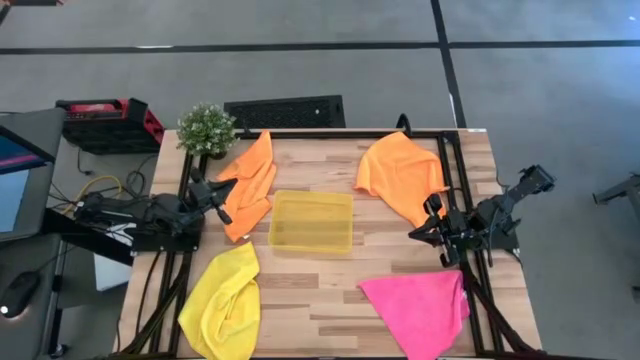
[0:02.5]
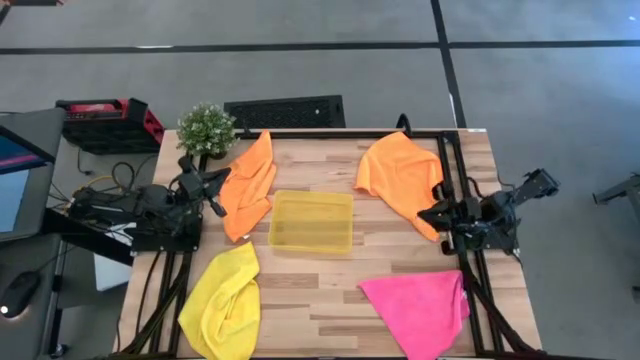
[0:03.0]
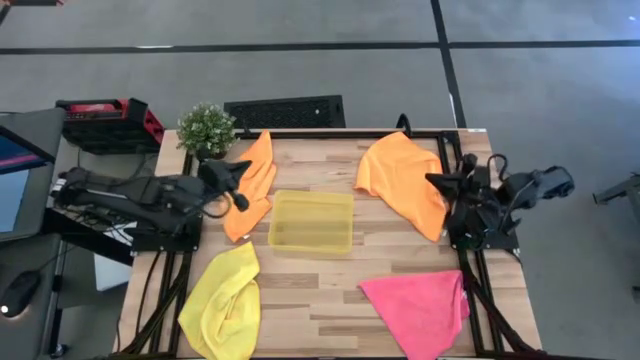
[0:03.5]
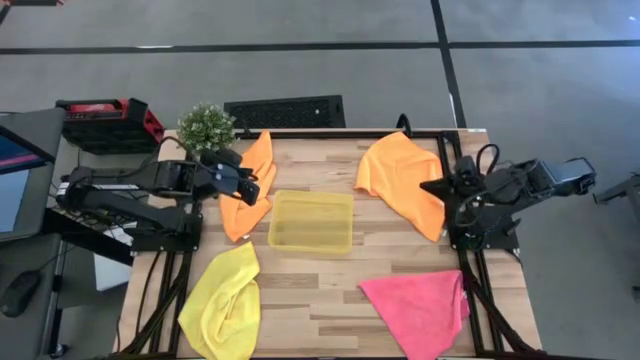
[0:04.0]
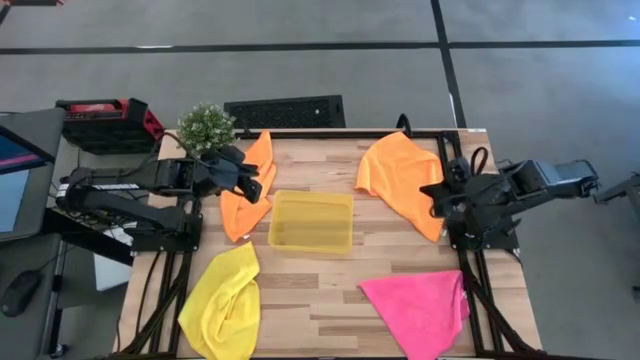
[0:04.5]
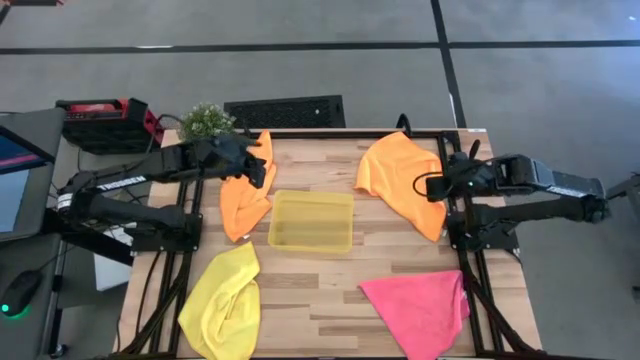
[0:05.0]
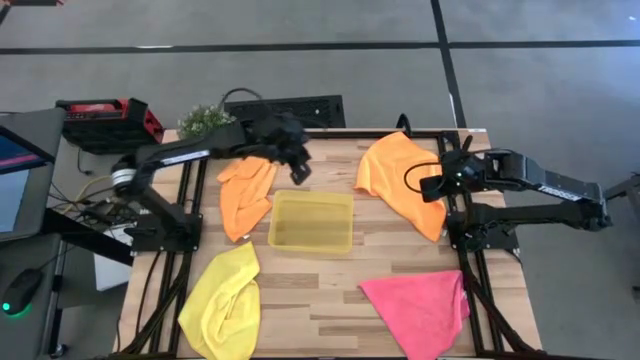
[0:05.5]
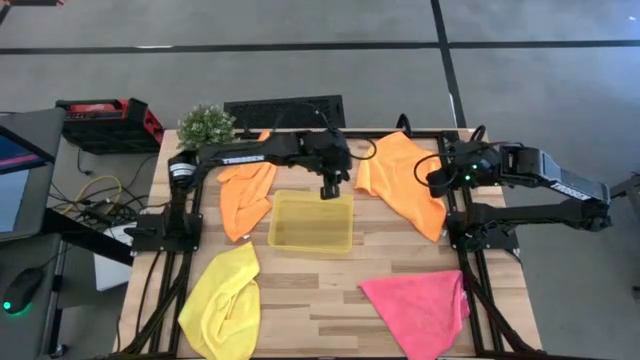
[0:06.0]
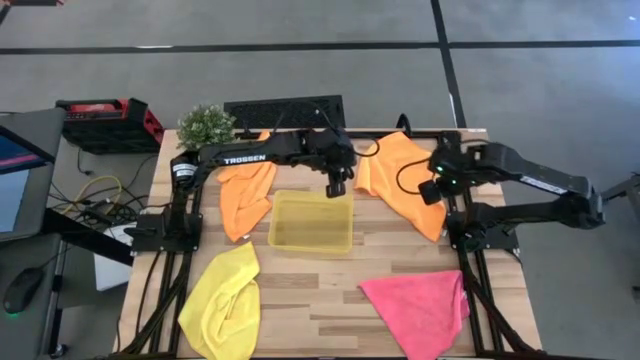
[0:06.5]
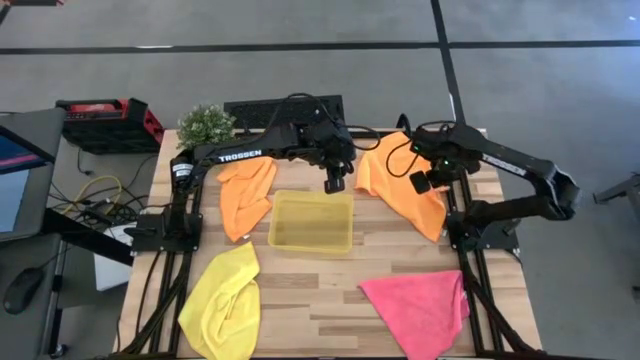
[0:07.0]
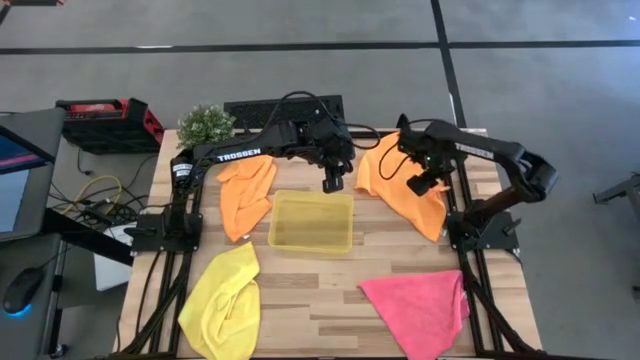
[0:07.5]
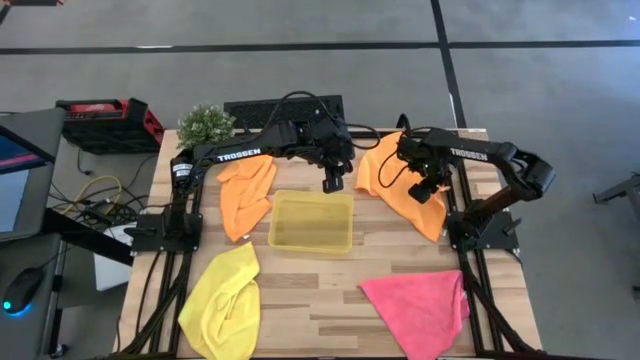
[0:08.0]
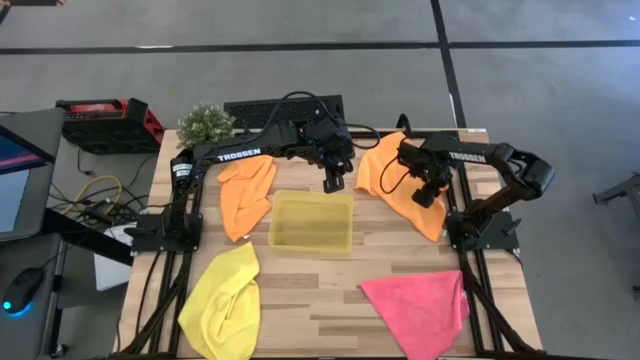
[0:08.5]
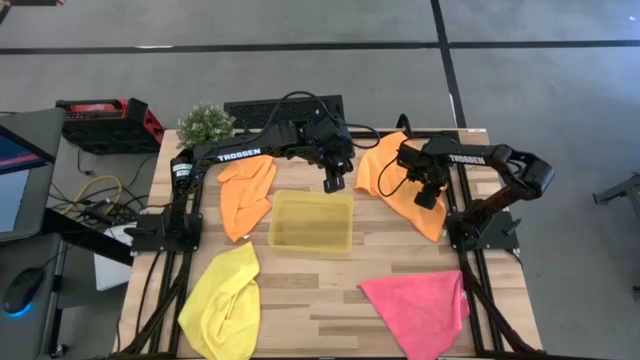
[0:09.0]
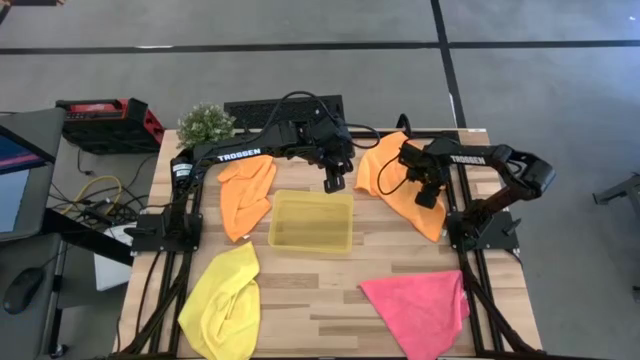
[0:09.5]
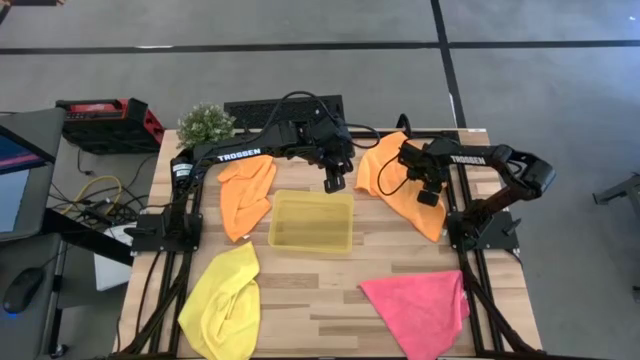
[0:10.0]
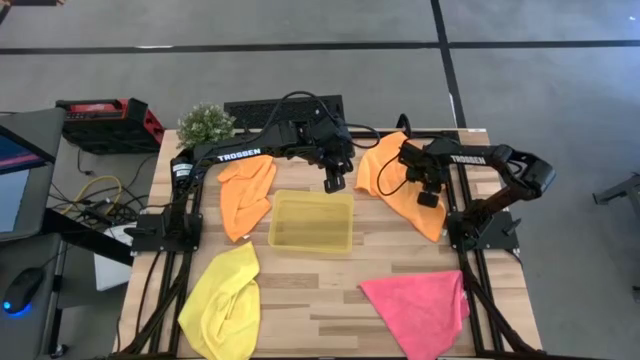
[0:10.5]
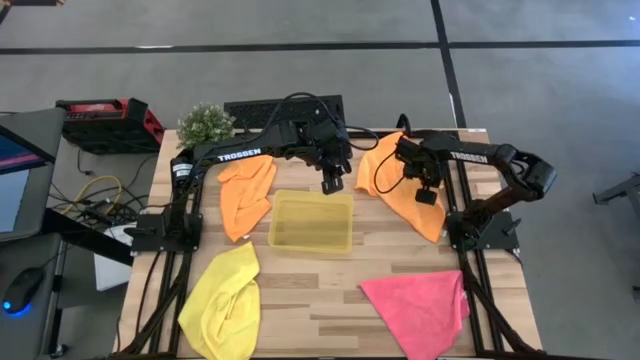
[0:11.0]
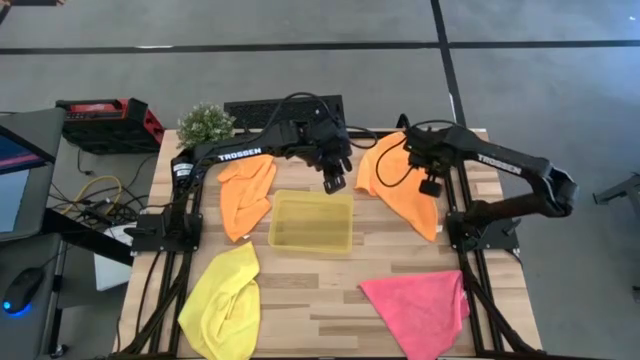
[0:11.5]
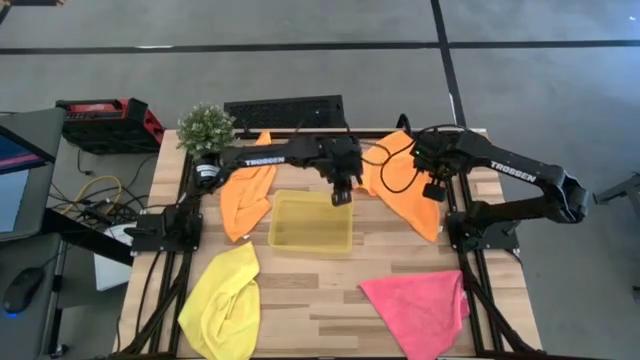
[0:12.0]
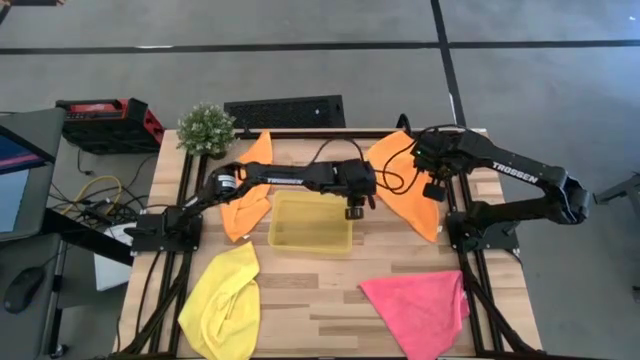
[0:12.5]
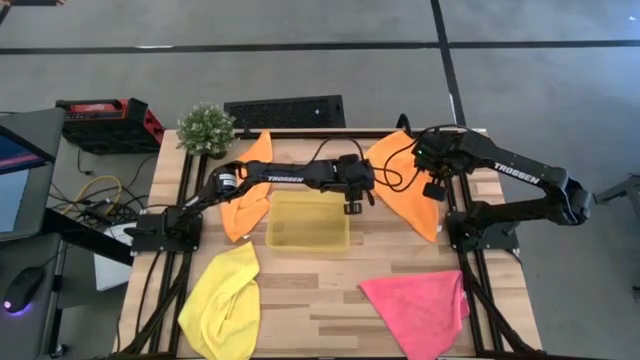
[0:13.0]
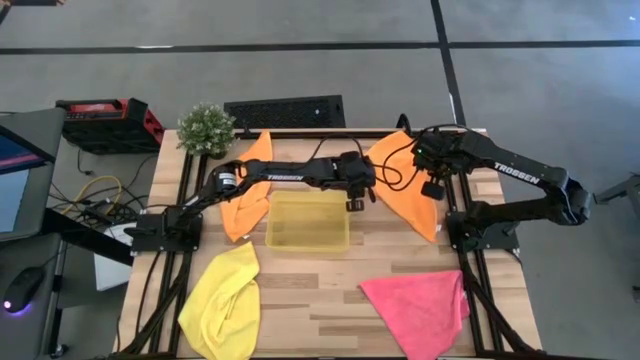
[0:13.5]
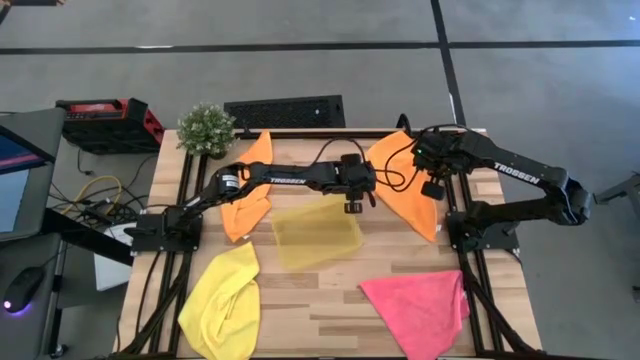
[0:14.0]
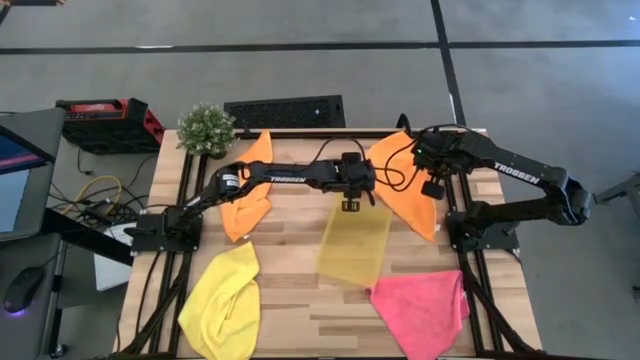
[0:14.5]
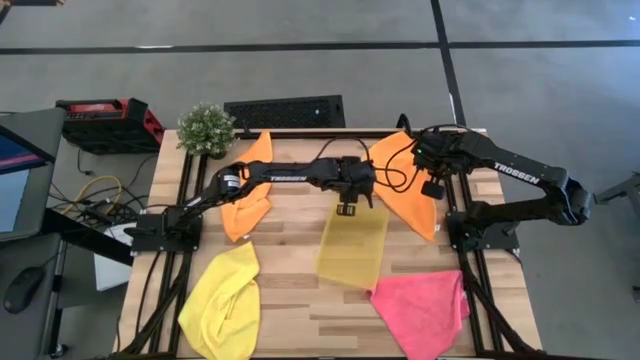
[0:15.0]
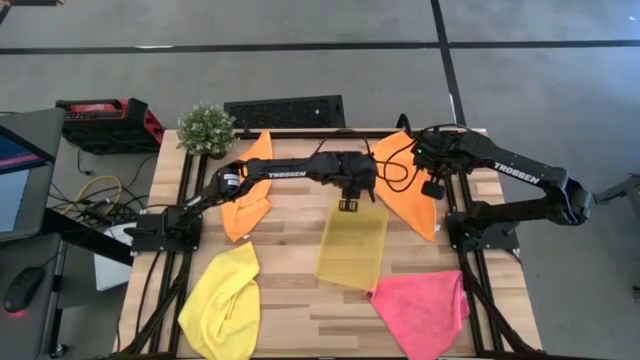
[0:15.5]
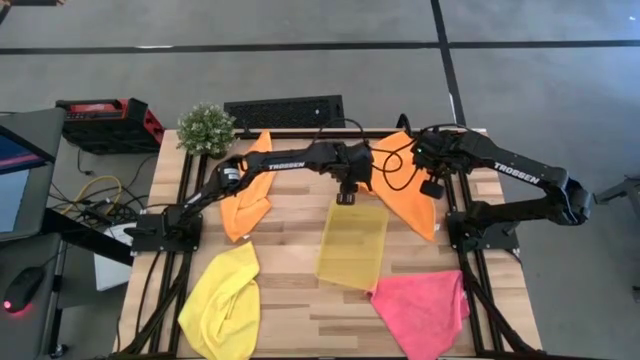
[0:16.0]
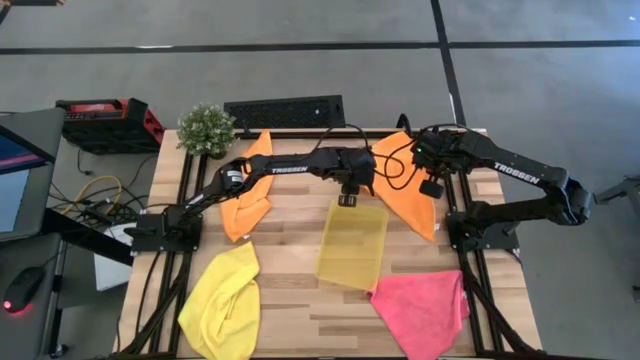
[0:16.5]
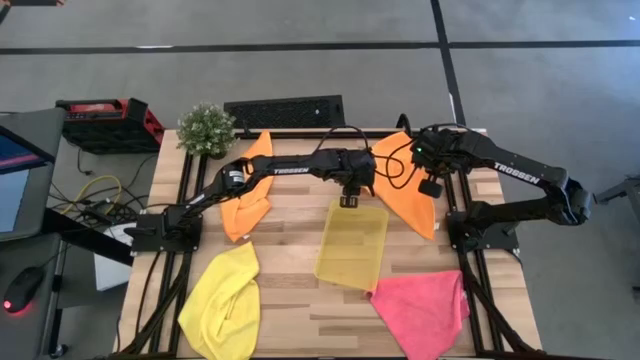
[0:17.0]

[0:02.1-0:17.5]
Task: Fold microfiber towels
Fold the right orange microfiber towel

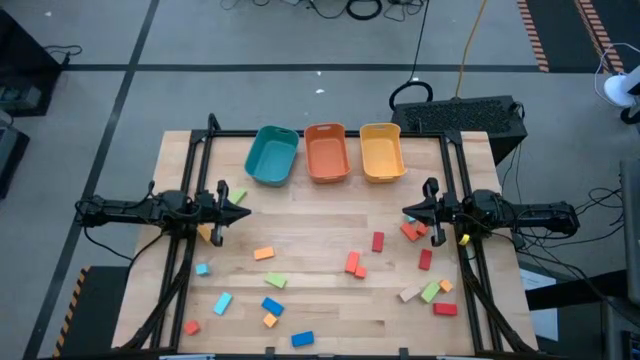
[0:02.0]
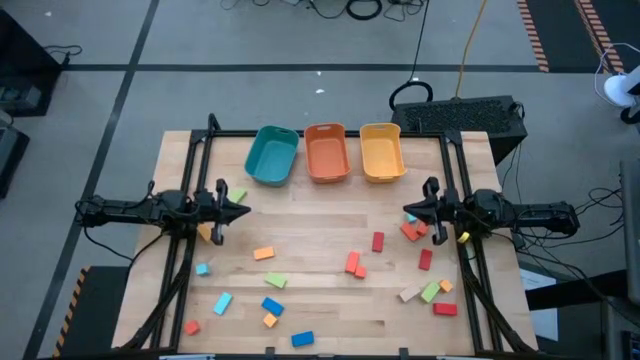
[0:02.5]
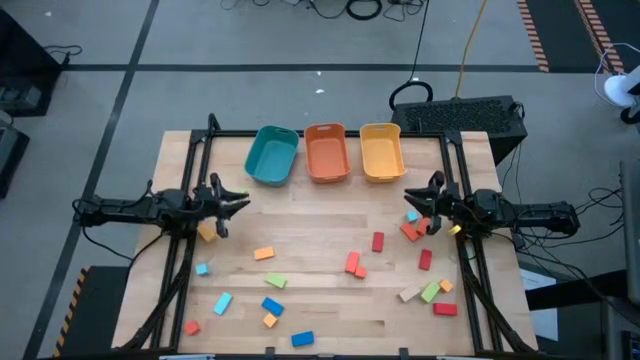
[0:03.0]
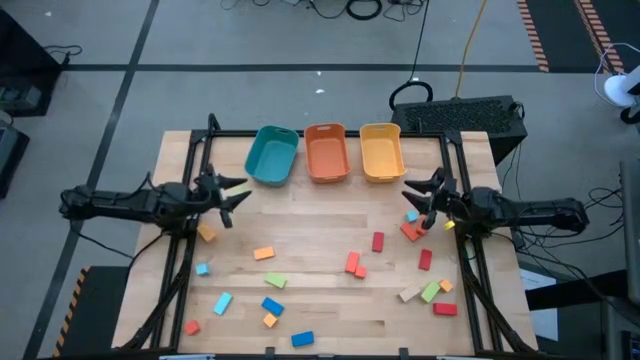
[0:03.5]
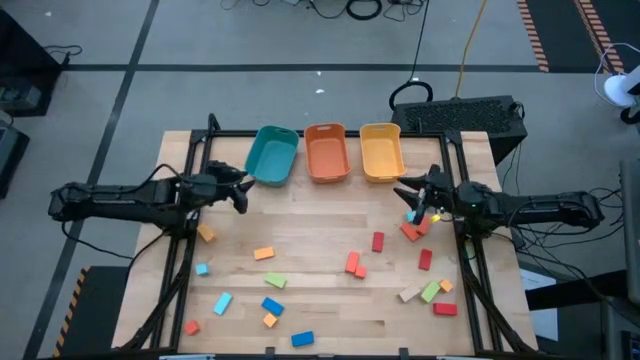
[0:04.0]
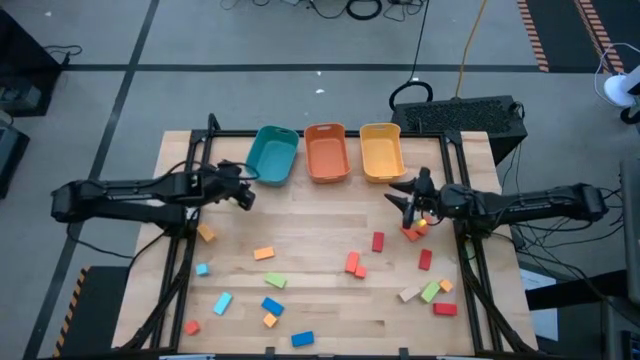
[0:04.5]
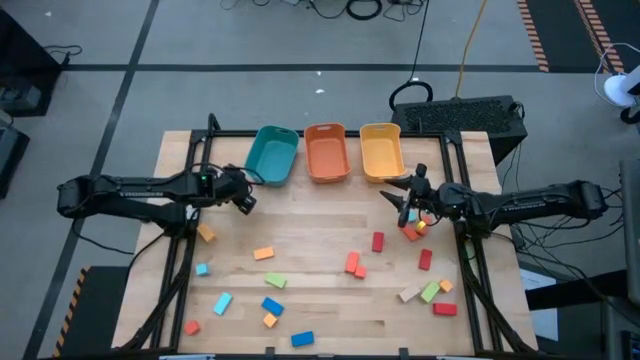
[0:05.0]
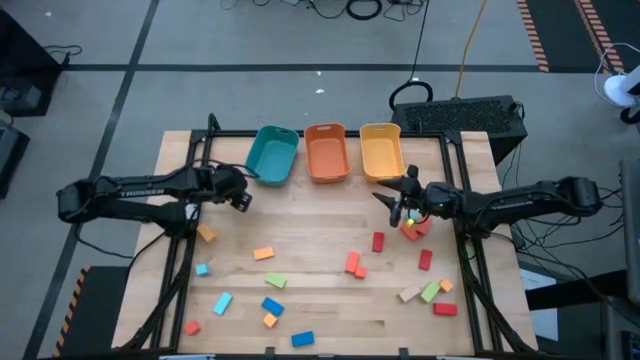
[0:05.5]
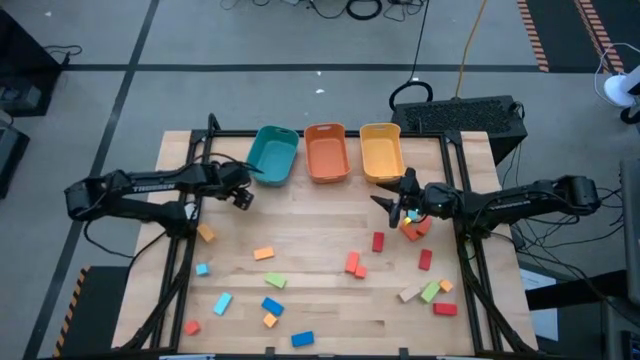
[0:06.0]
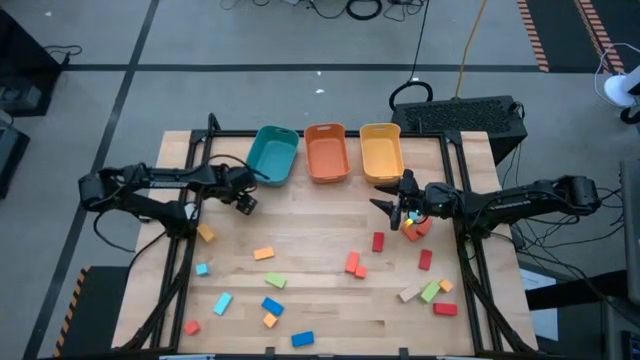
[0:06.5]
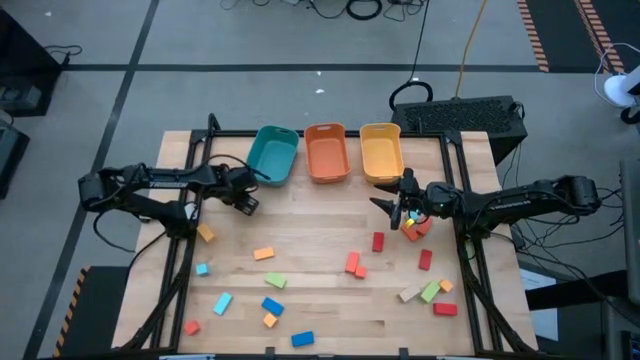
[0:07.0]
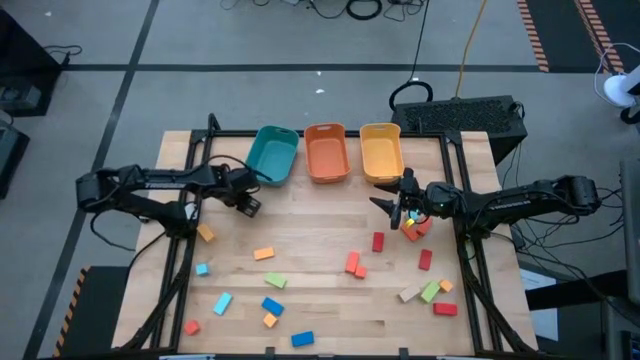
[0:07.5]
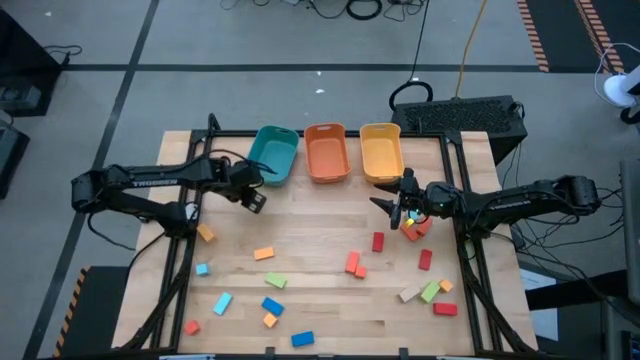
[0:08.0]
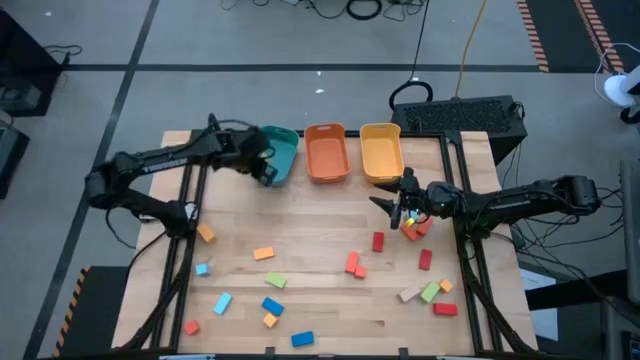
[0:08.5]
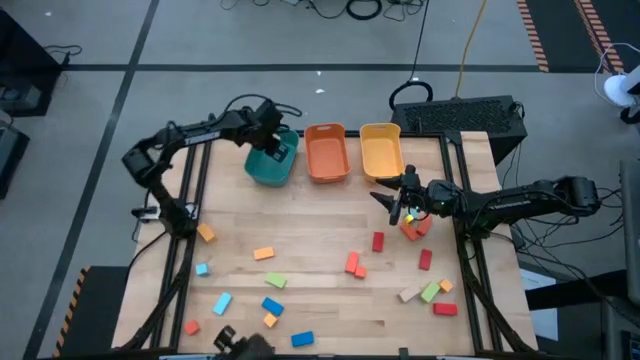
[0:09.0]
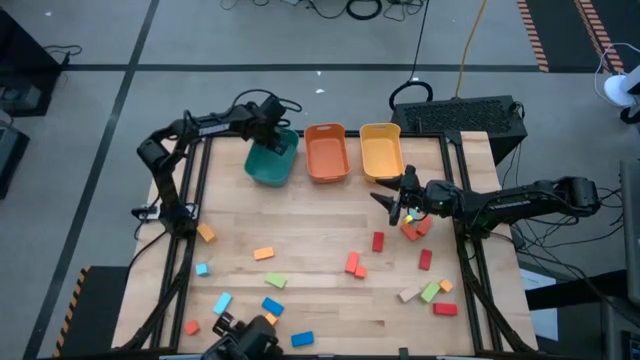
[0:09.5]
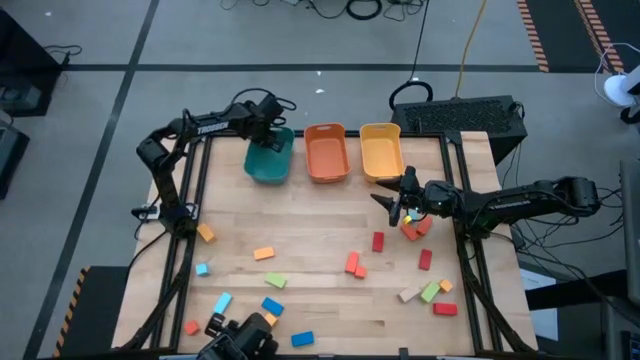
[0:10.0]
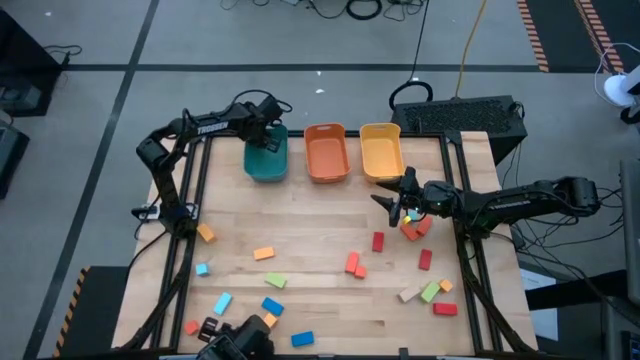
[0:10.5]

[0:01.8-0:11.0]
Task: Sort blocks by size
Put the green thin rectangular block into the blue bin
